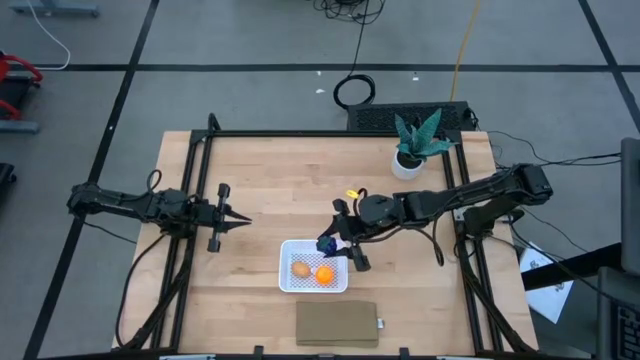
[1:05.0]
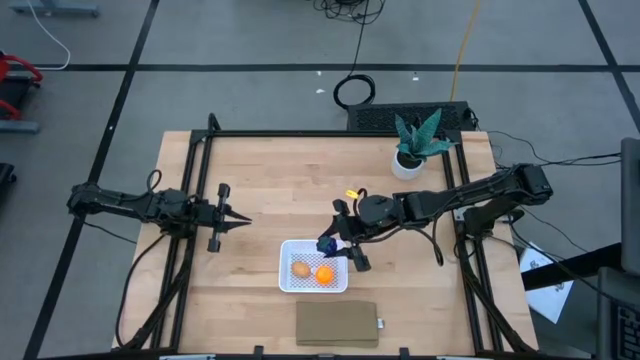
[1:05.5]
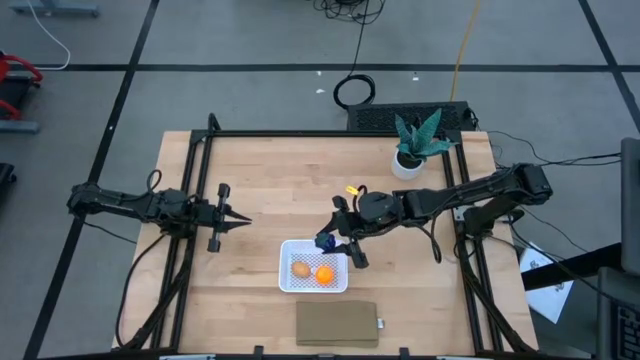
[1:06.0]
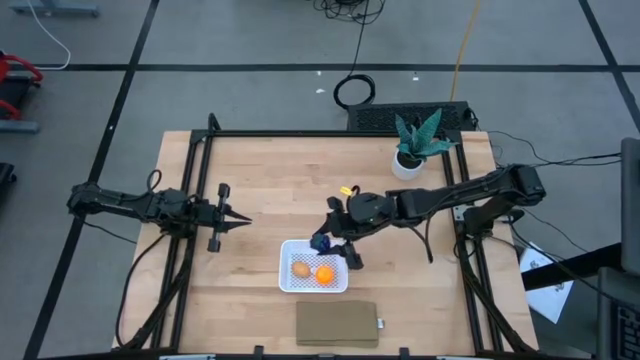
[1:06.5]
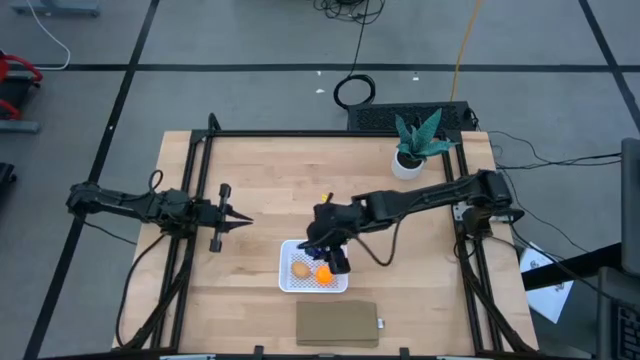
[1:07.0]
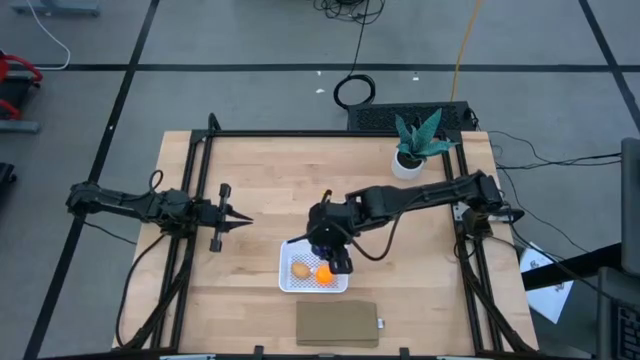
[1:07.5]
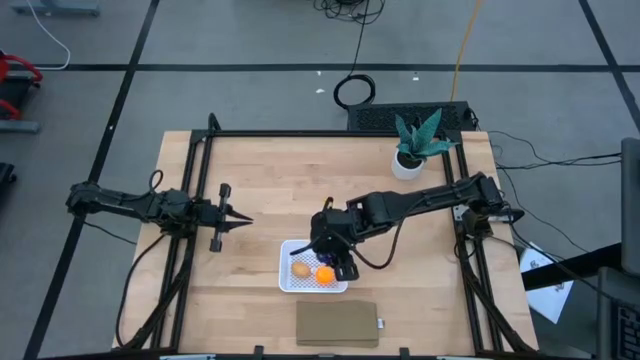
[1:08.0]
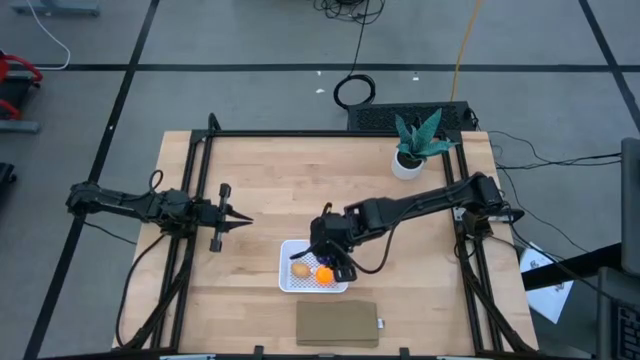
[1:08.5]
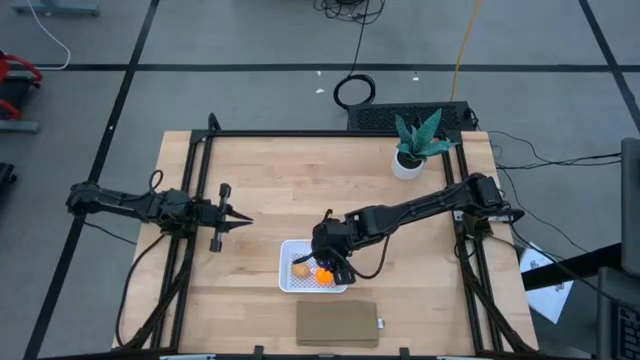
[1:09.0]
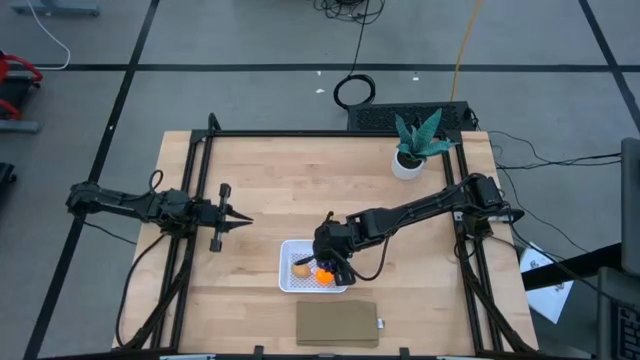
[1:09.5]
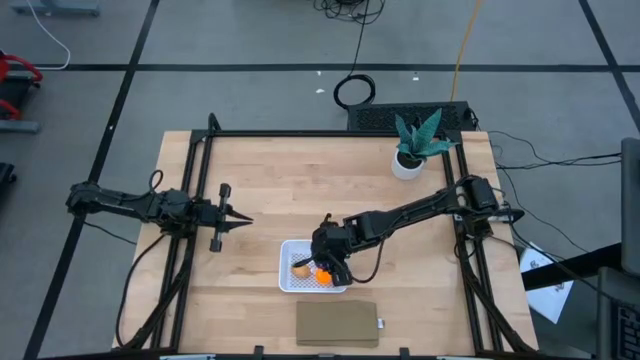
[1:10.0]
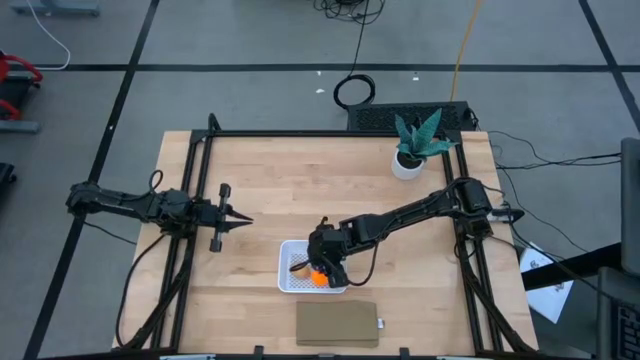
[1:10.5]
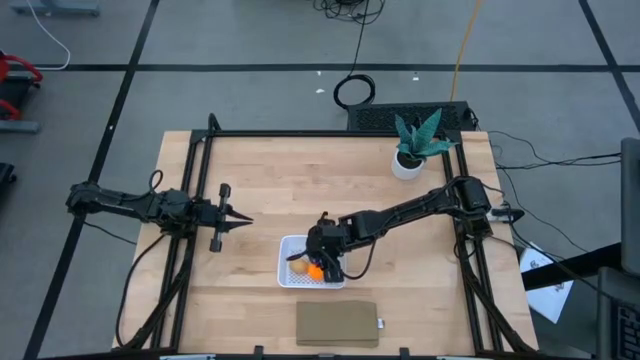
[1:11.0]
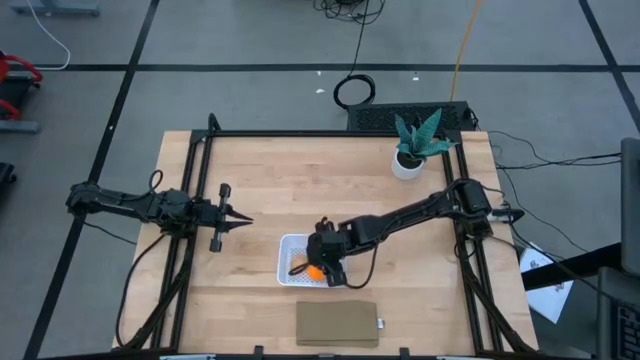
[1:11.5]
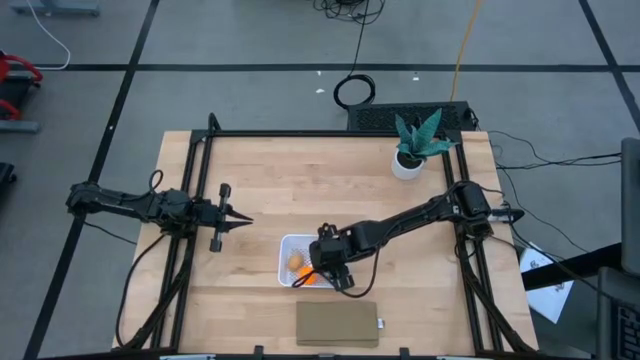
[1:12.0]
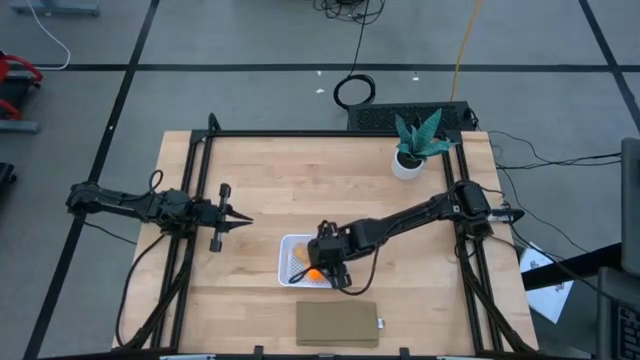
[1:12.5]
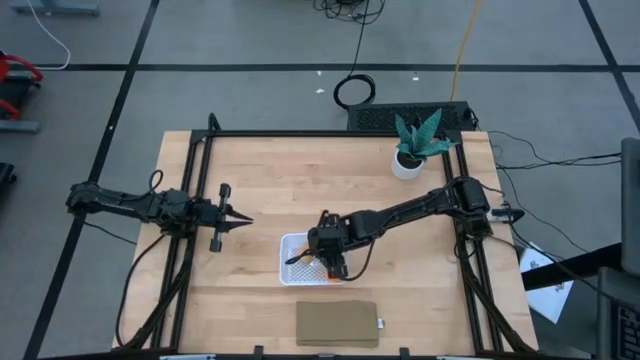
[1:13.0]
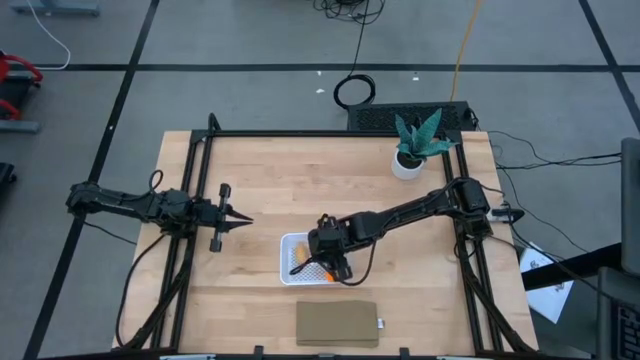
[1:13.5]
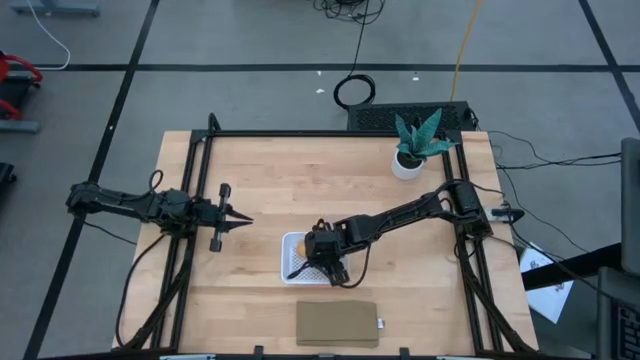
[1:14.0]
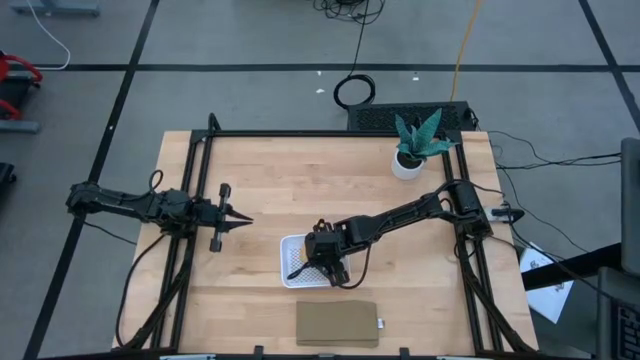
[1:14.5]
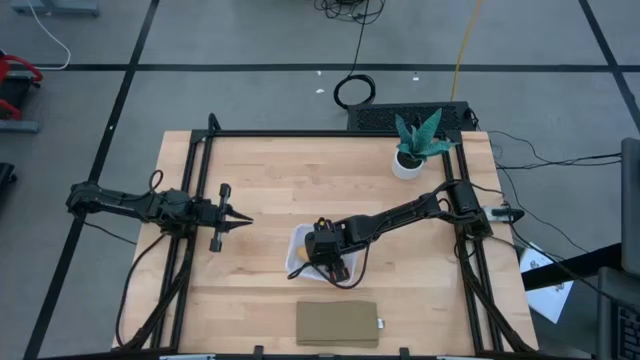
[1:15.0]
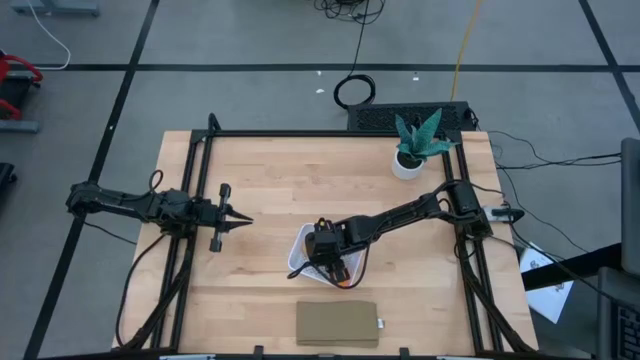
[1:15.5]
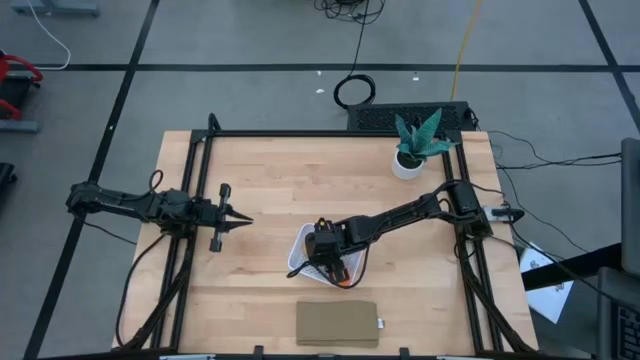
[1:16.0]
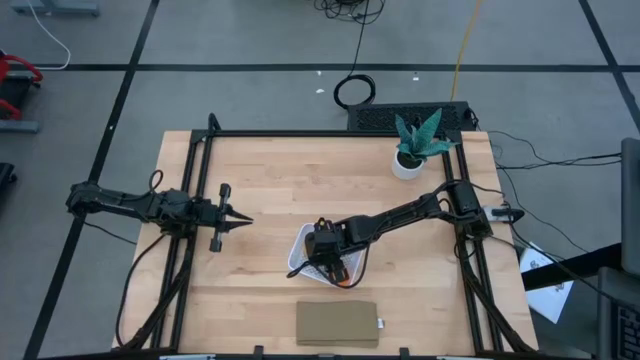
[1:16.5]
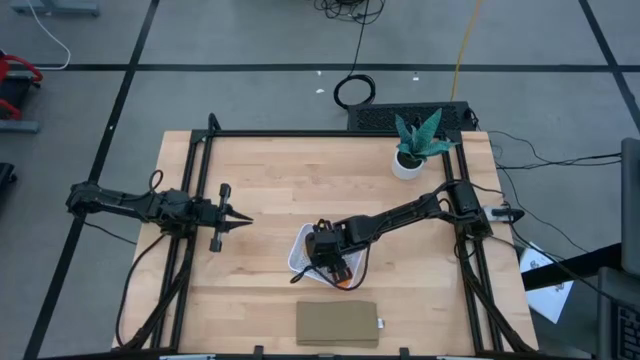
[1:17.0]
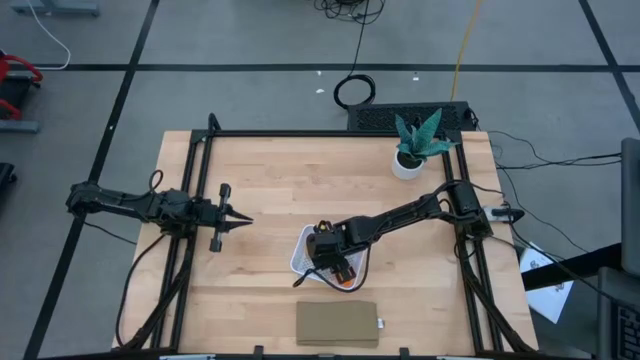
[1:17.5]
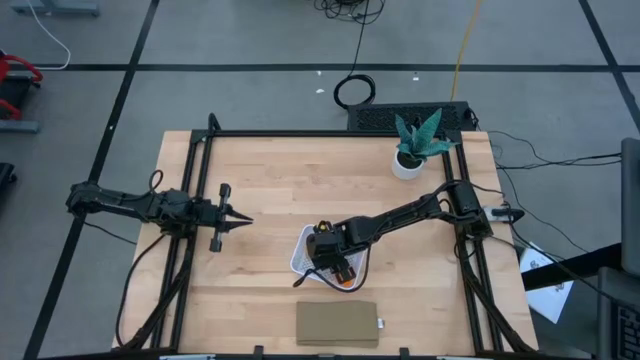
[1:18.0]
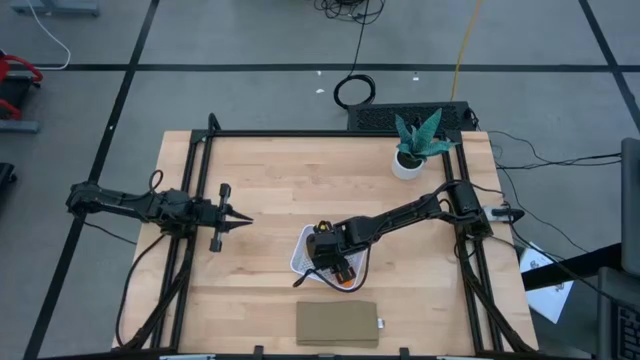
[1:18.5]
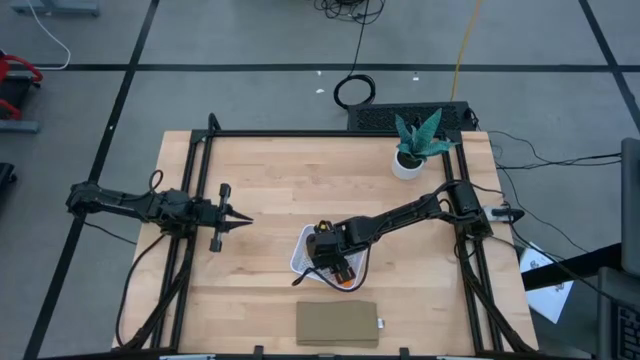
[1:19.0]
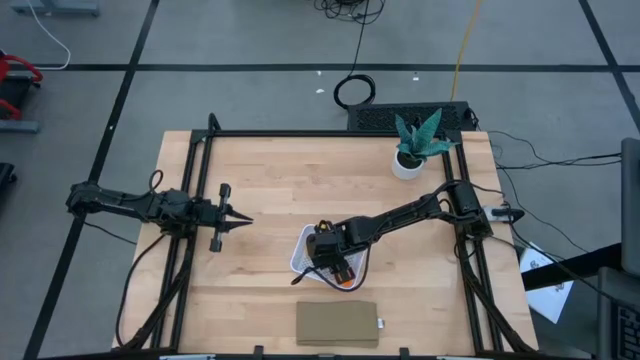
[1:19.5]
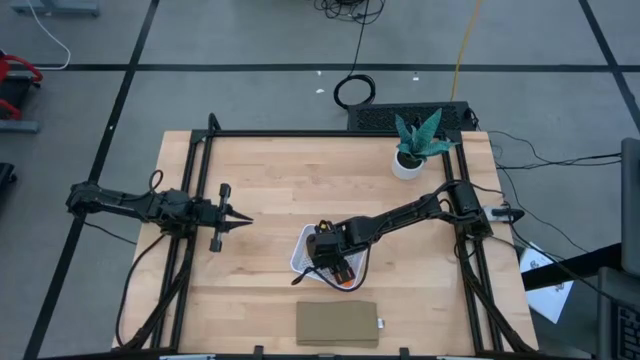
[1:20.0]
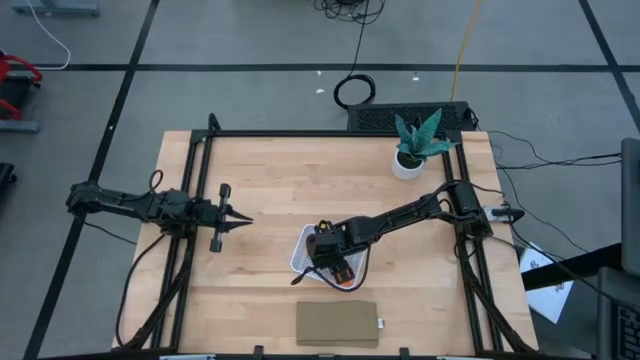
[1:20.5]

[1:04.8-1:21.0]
Task: Pick and placing Produce into tupperware
Put the blackberry into the basket

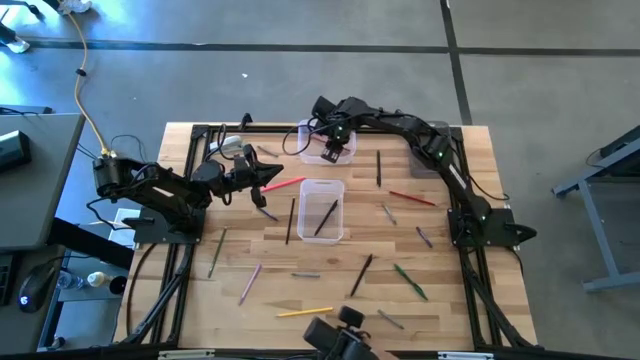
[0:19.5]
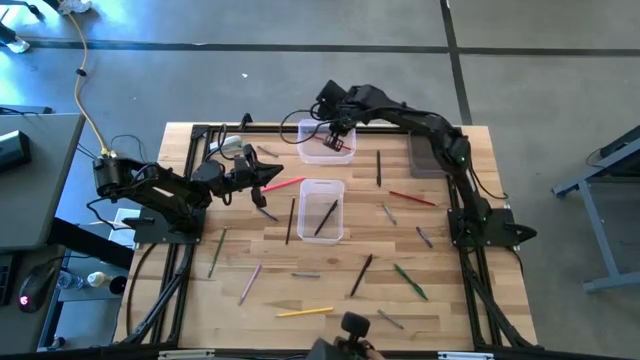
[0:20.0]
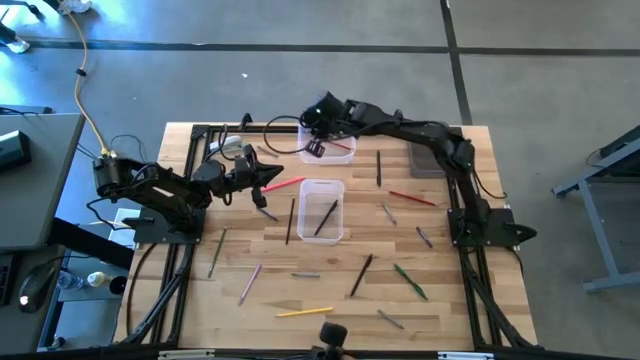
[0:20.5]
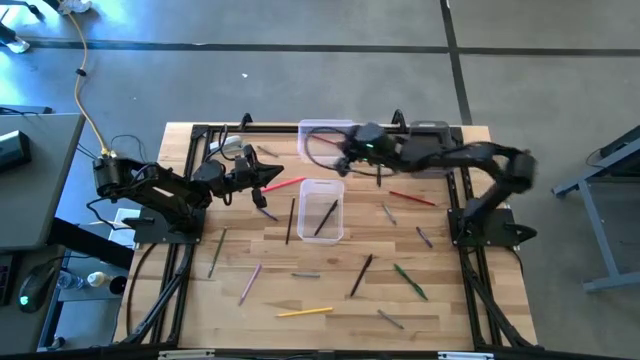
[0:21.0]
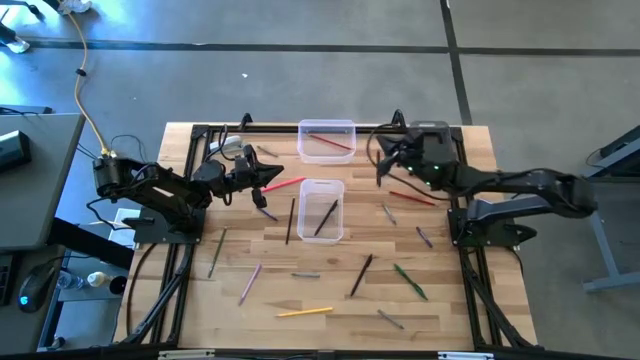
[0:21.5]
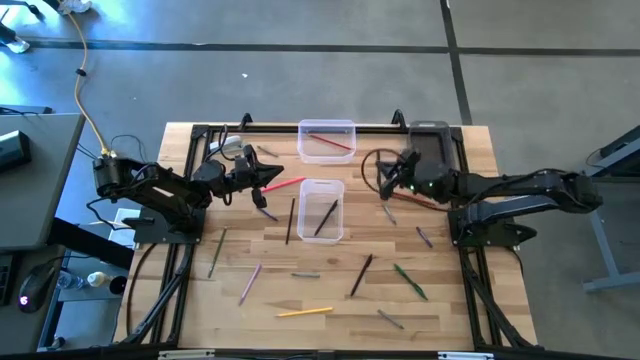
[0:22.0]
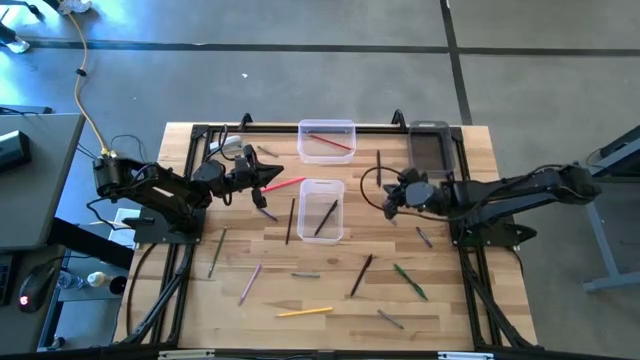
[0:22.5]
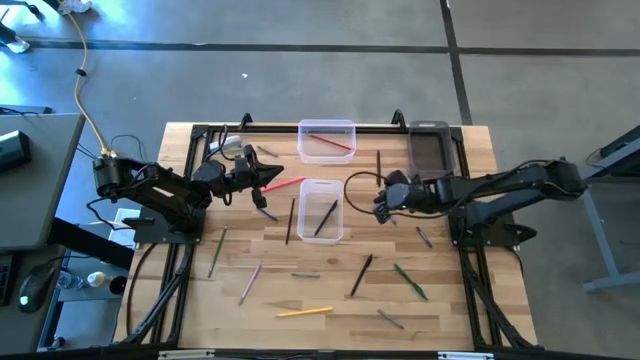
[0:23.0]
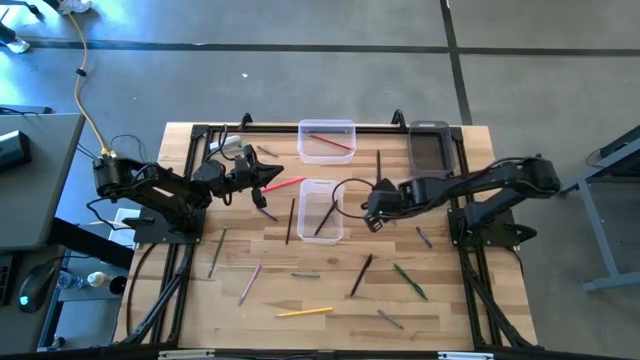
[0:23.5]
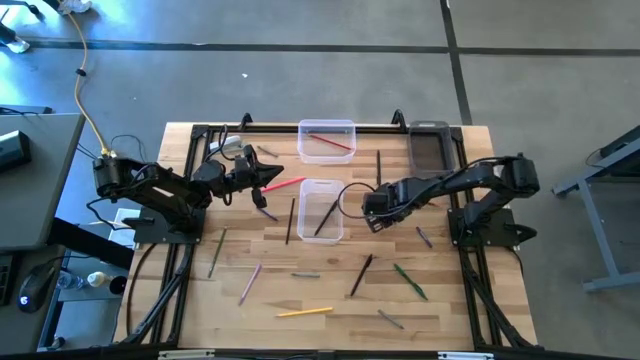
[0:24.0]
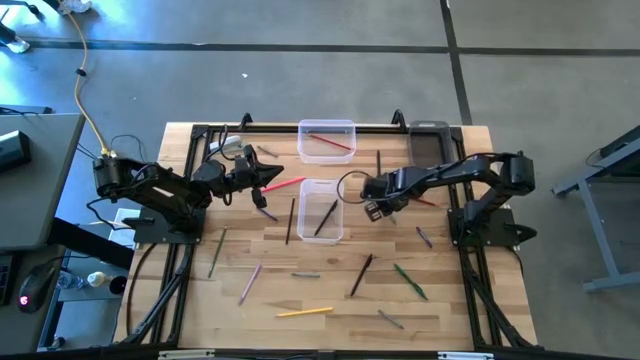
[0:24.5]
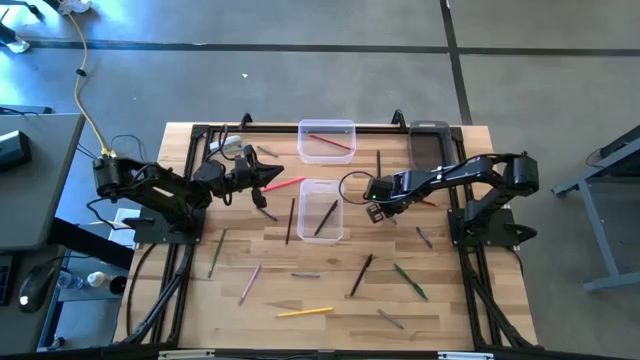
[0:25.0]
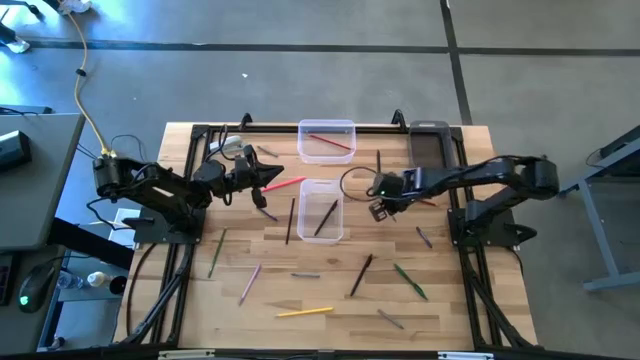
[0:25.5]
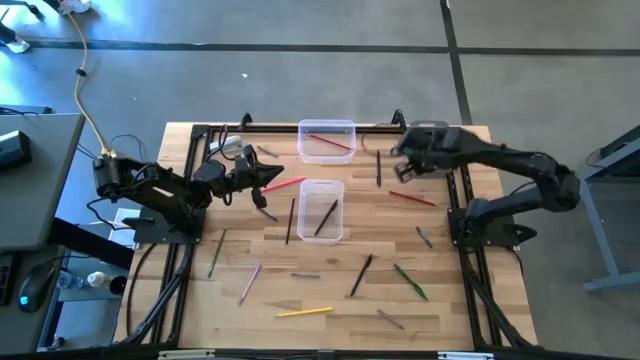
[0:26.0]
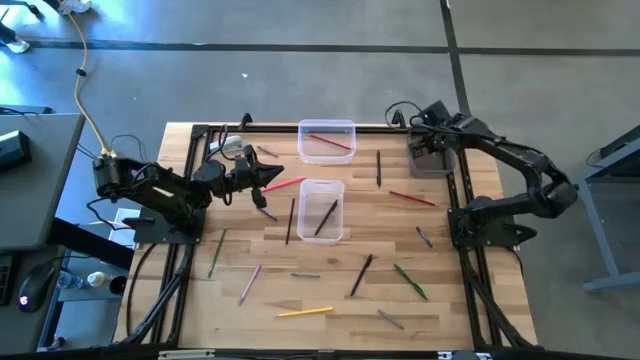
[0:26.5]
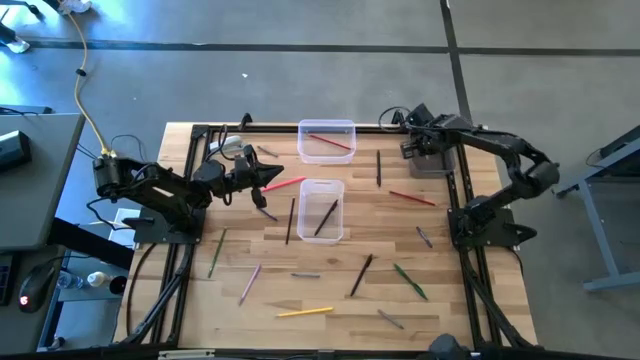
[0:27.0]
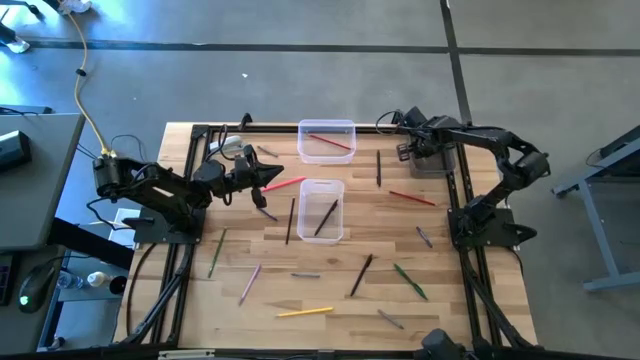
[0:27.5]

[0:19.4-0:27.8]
Task: Sort crayons/erasers/pens/pencils in bins
Put the top right gray crayon into the transparent black bin
